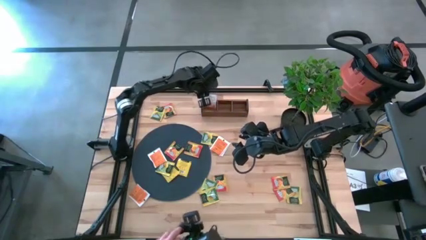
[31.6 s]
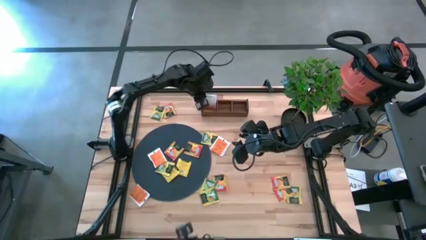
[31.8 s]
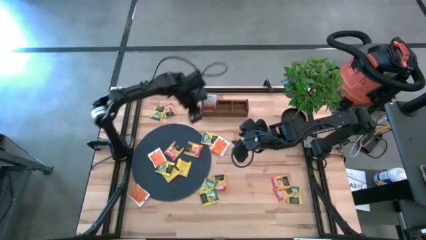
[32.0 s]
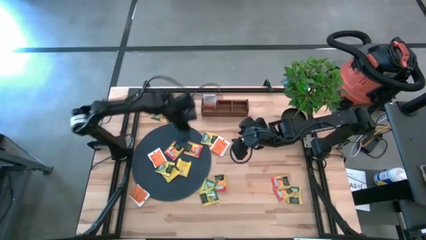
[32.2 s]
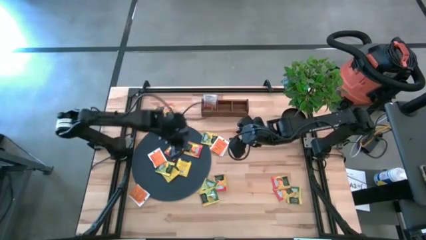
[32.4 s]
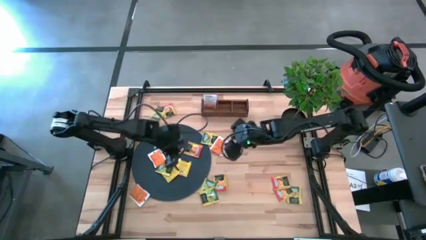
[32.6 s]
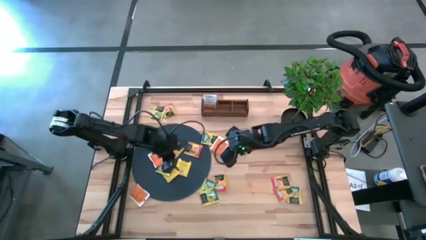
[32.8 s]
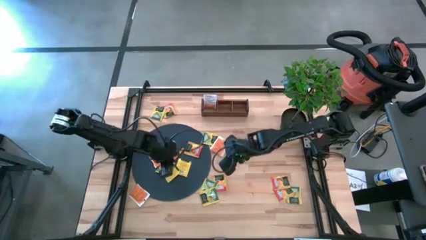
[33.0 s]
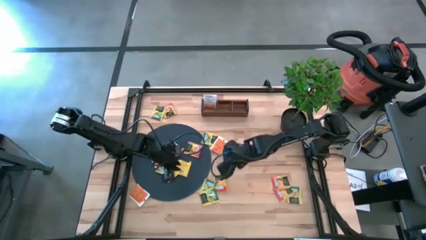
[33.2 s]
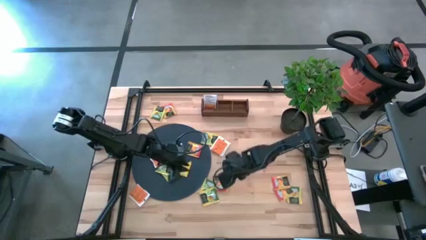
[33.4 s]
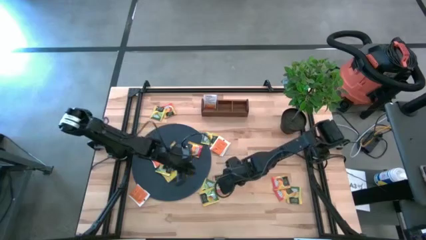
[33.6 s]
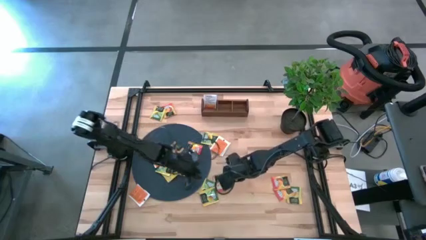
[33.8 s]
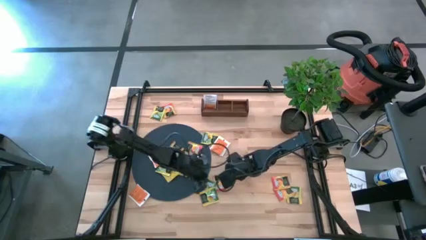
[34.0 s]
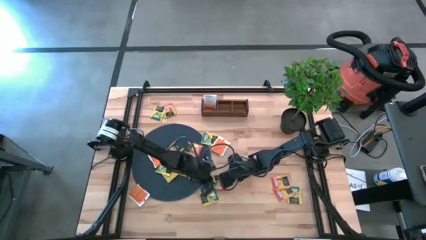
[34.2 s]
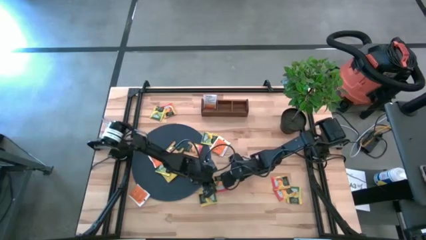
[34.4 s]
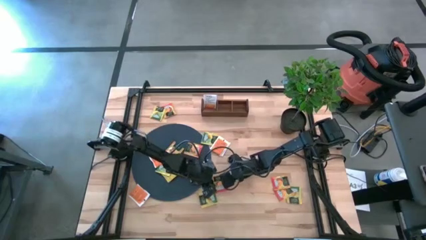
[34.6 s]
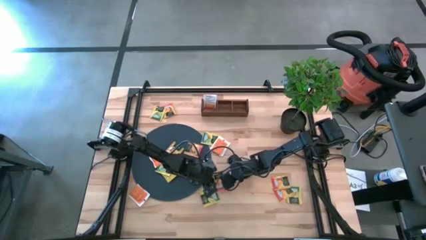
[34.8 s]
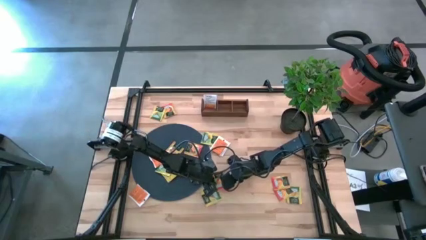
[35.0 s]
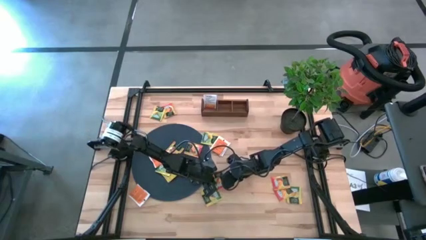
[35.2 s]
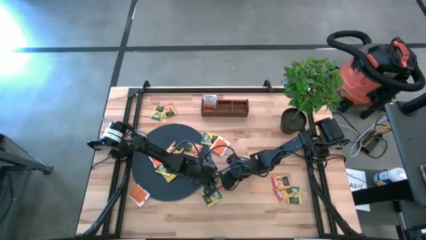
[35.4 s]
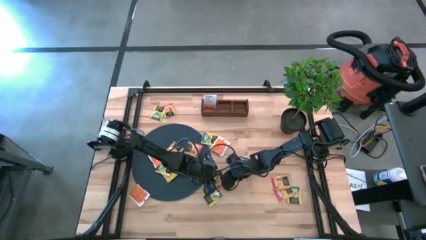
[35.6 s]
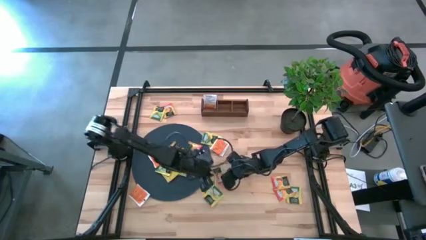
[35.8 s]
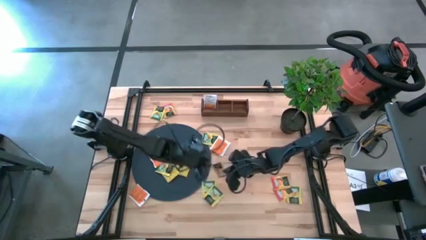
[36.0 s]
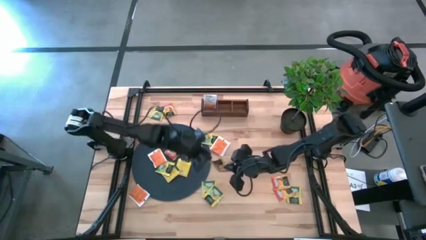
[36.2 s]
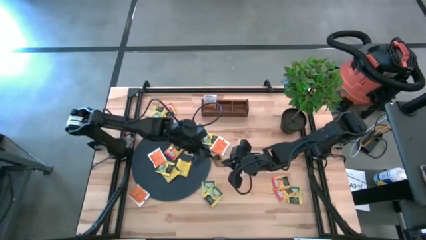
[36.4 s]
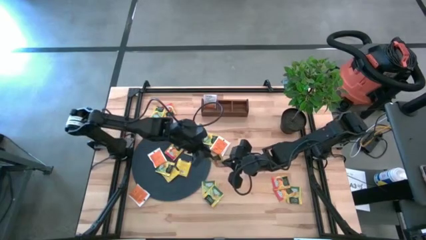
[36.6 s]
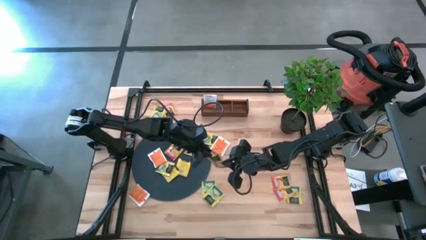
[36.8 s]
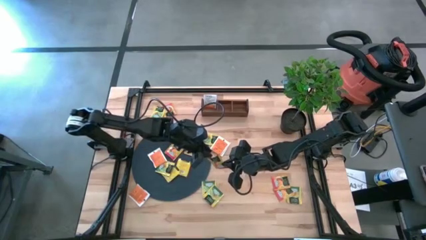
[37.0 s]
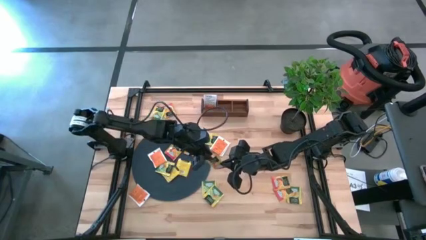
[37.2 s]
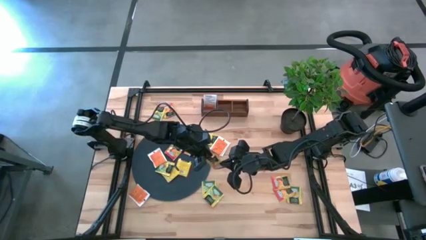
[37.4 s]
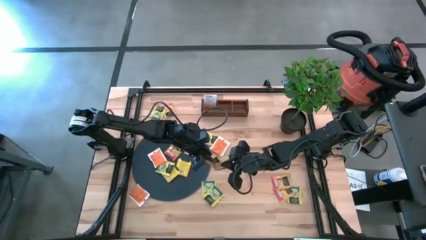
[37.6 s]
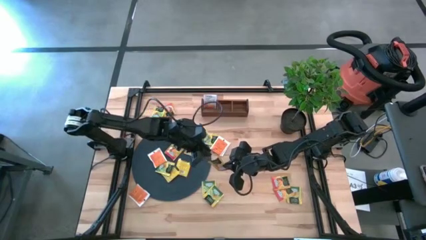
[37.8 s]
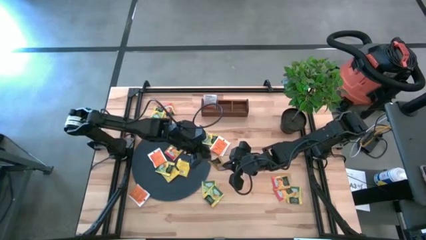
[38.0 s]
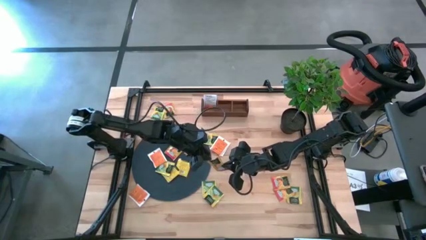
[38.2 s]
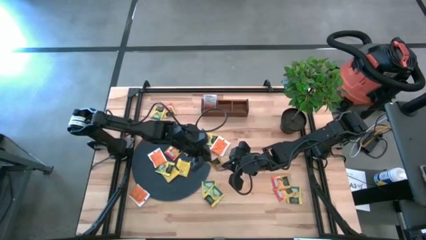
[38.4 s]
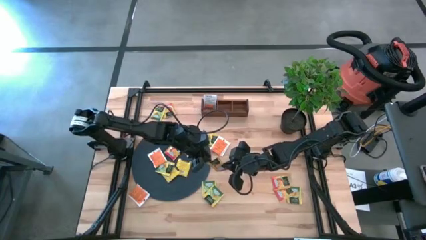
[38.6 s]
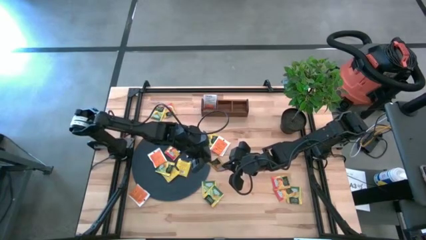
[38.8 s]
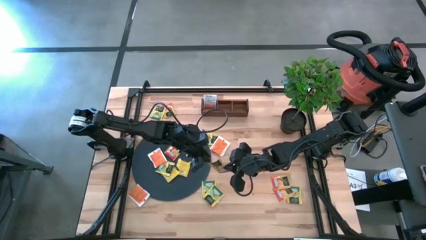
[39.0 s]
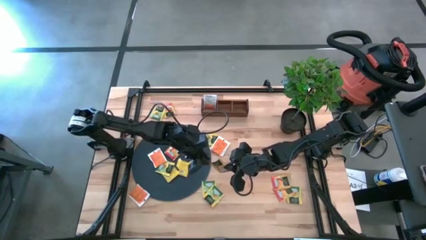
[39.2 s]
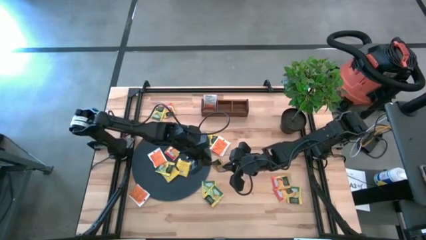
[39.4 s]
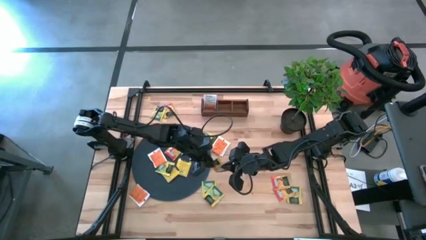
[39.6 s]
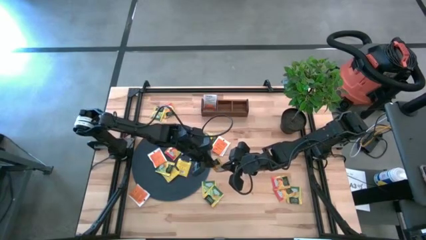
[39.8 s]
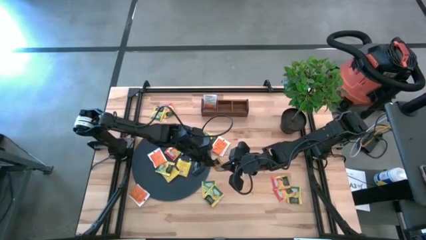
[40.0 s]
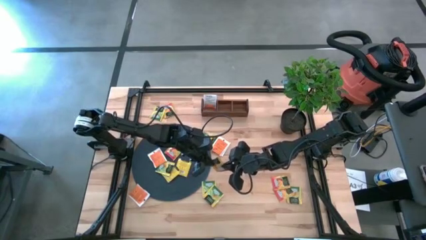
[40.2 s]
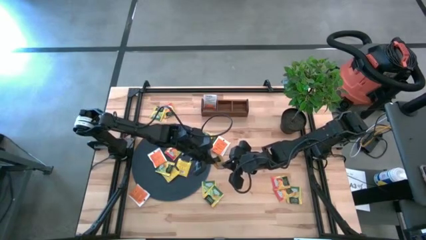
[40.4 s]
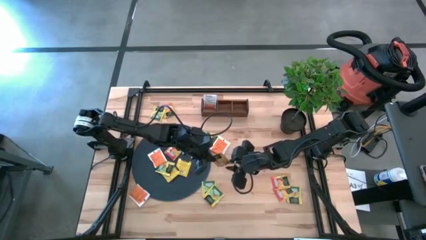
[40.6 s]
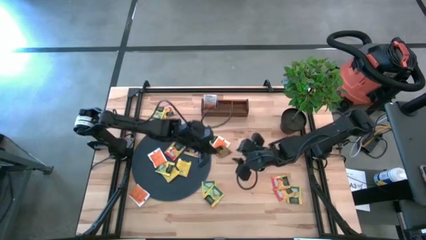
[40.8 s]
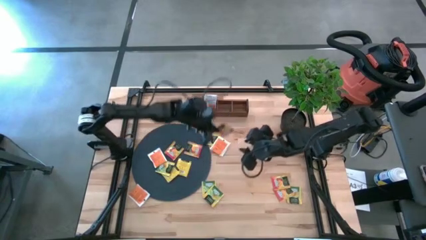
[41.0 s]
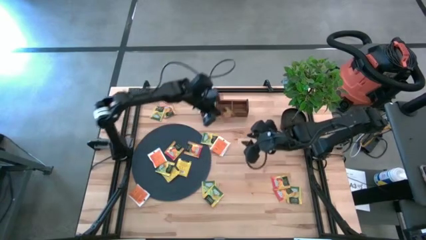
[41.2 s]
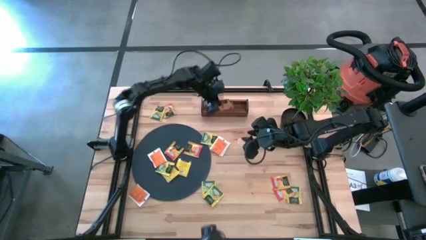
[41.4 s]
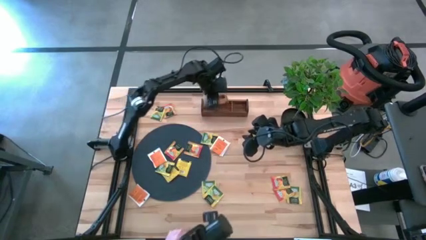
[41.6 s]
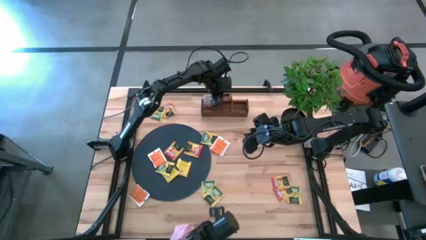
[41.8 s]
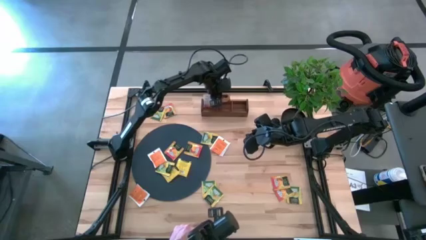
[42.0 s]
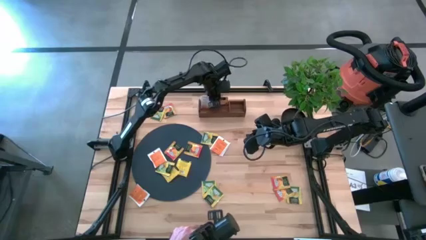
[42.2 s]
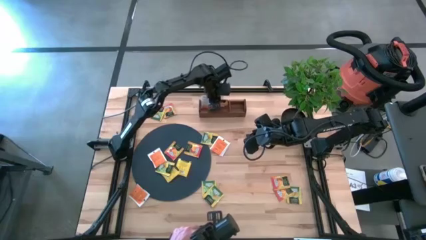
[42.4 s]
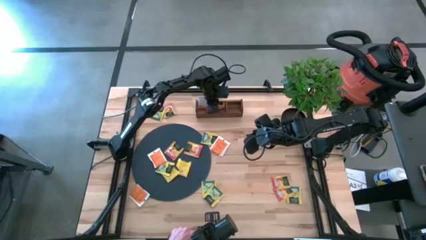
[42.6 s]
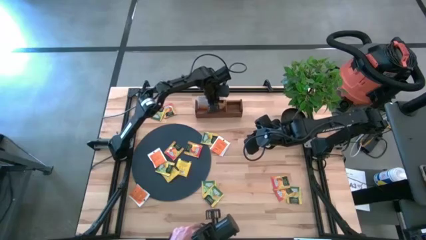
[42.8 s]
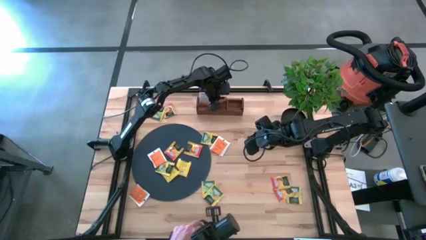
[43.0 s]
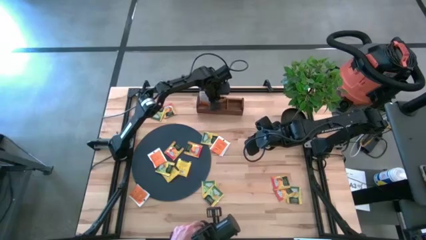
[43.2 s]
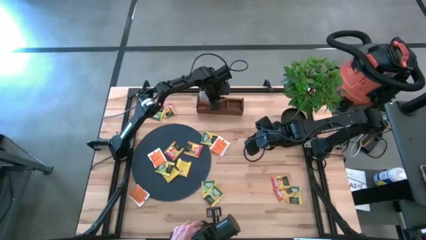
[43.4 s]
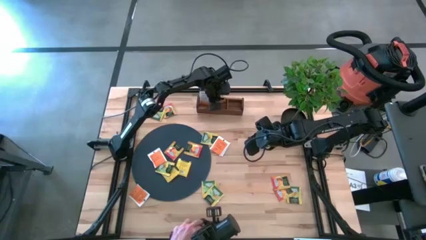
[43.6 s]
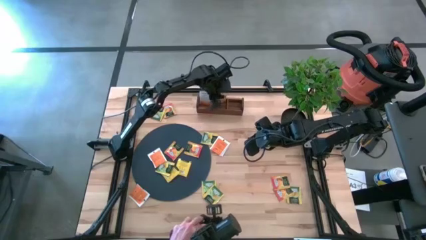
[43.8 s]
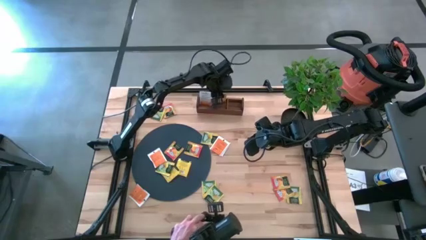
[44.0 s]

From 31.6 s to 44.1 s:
Task: Pick & Place Tea
Put the yellow tea bag into the middle section of the wooden organizer

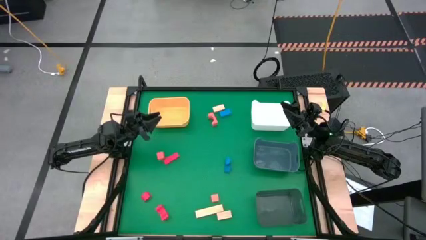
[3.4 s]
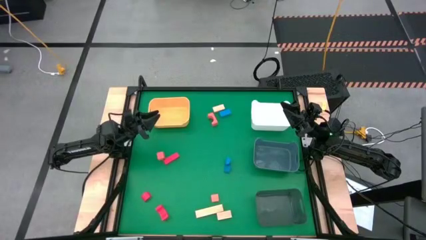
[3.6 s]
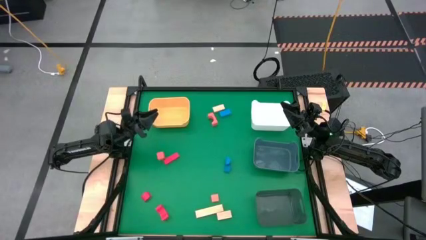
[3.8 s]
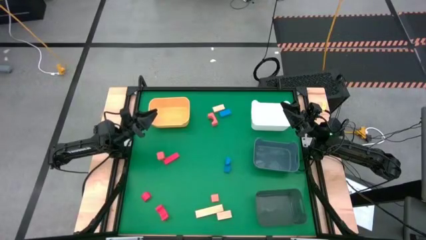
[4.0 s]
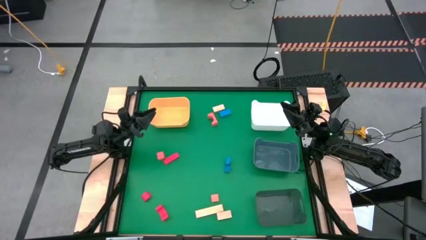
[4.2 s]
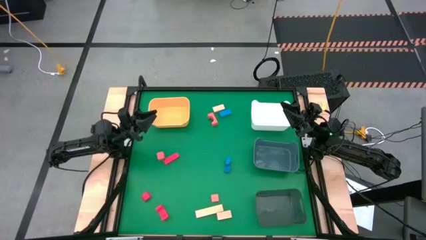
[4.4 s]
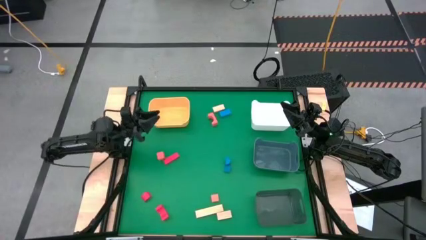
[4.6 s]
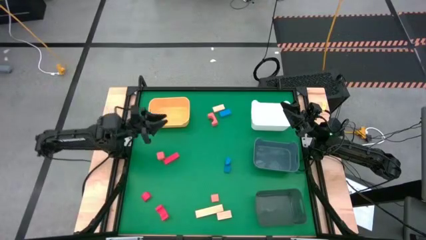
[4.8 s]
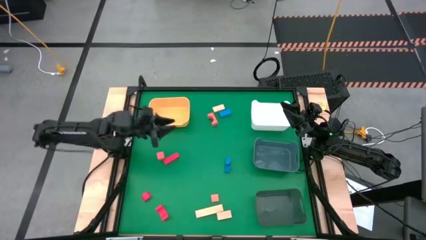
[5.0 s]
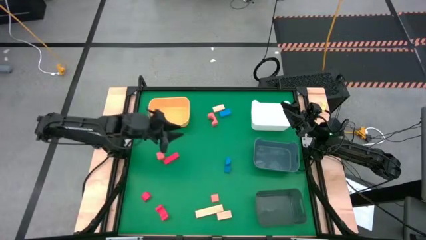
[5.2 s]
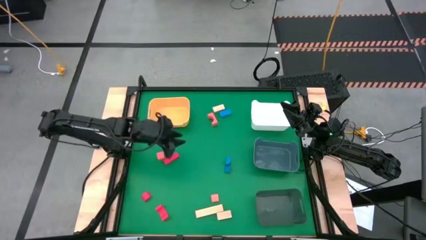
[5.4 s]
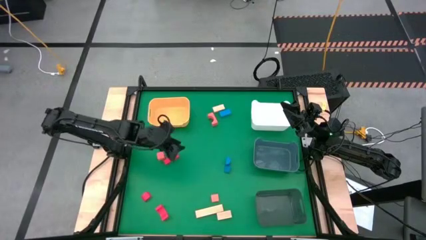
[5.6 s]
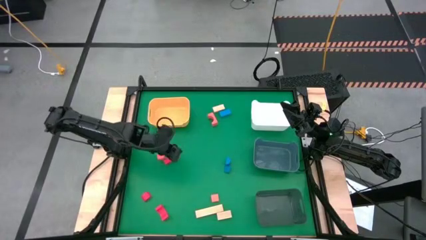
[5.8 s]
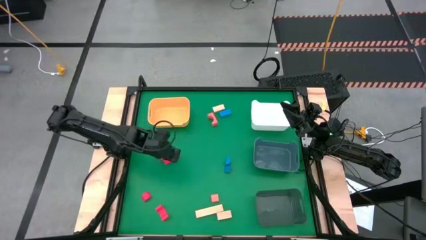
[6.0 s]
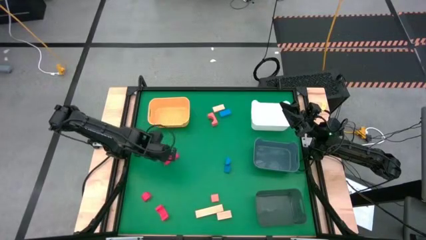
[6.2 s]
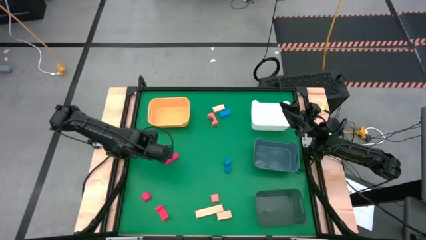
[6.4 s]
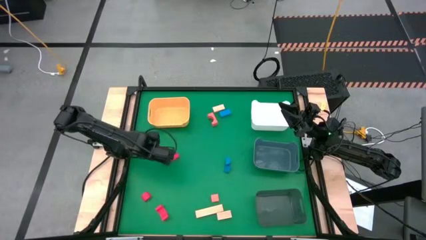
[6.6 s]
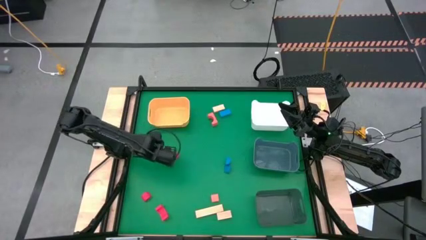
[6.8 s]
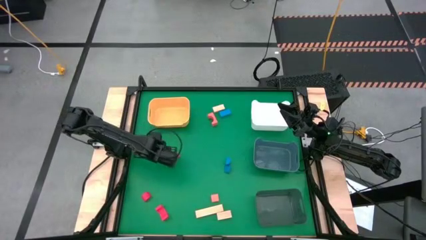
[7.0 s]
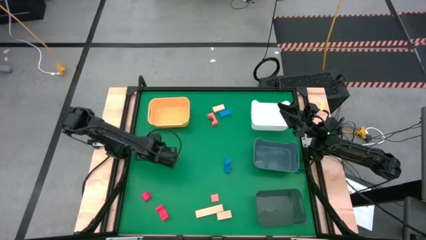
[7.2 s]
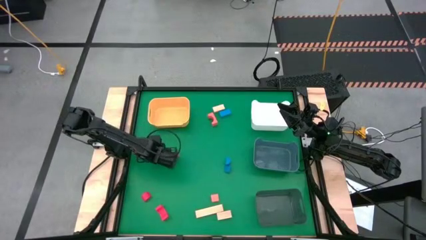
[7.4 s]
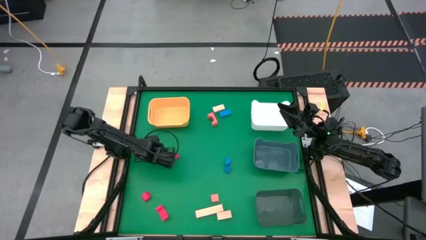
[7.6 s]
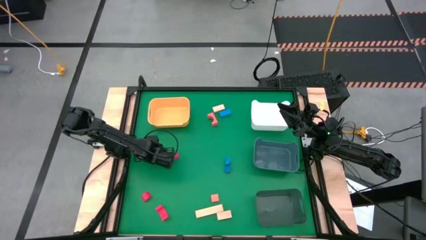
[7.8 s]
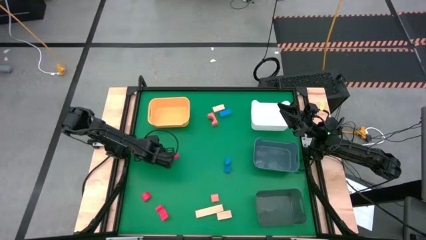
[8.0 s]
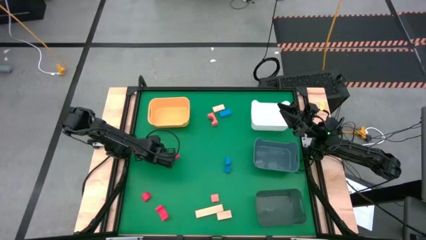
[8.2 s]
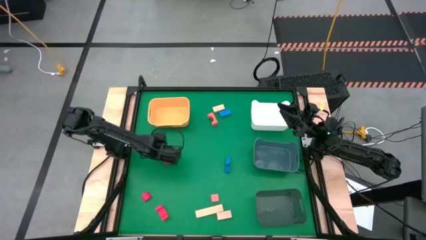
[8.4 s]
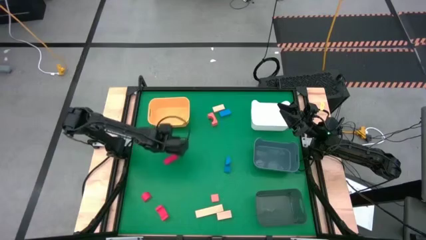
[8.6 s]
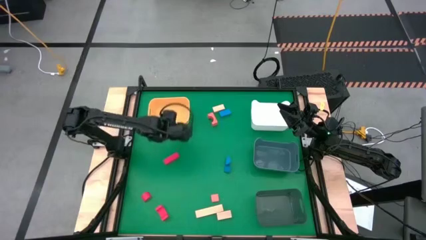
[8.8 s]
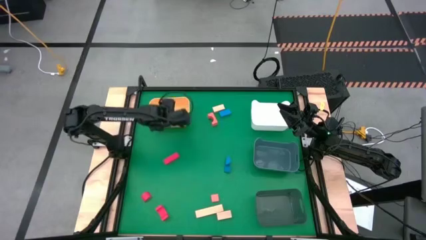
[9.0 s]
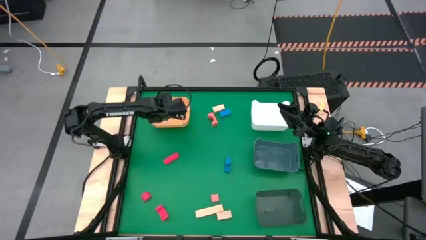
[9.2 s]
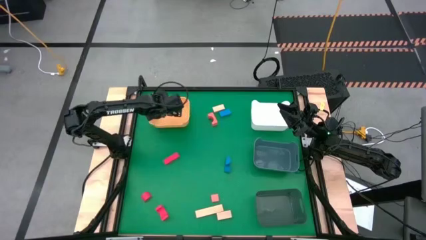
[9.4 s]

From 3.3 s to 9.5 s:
Task: Sort & place blocks by color
Put the middle left orange block into the yellow bin
